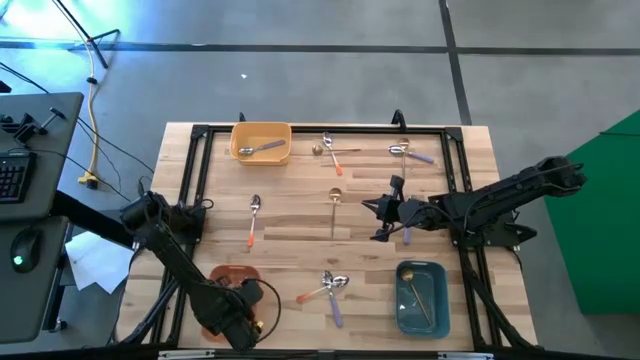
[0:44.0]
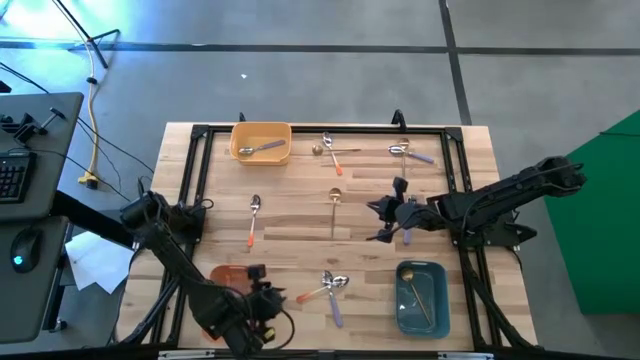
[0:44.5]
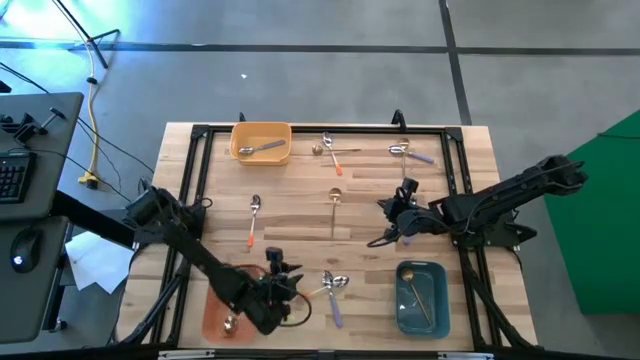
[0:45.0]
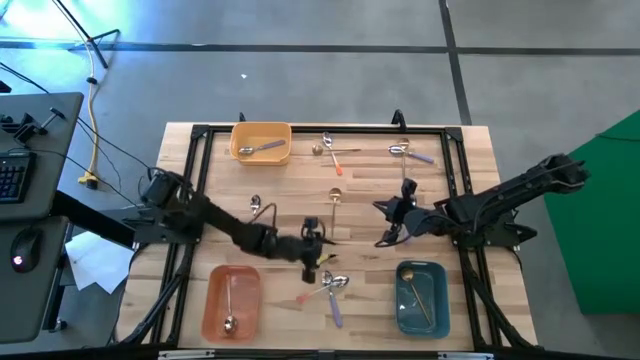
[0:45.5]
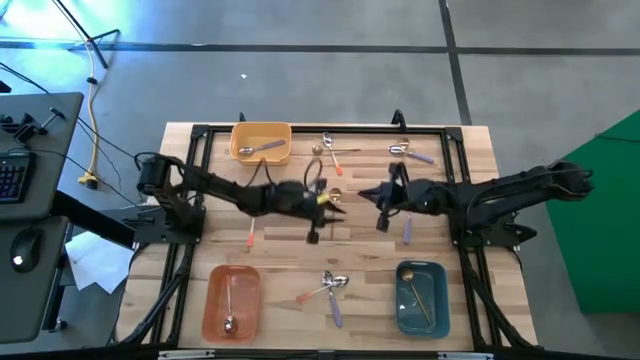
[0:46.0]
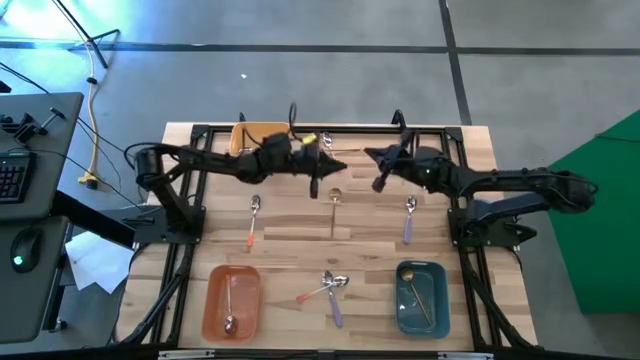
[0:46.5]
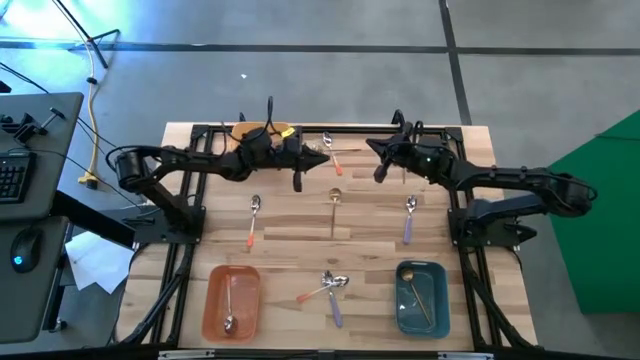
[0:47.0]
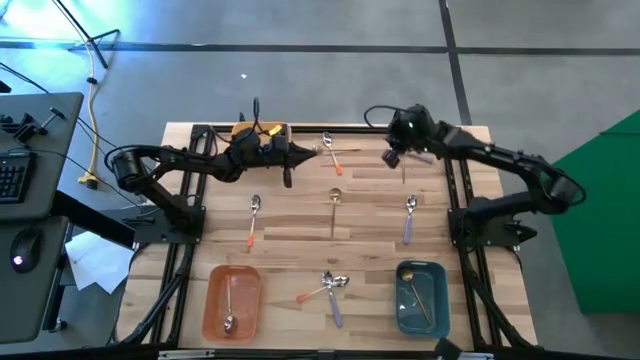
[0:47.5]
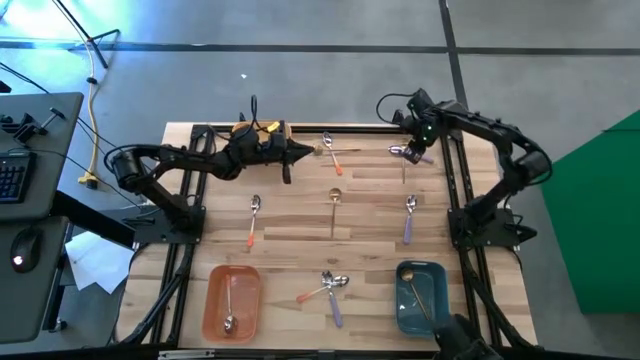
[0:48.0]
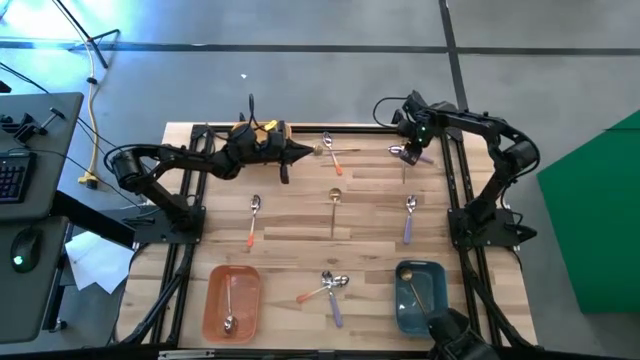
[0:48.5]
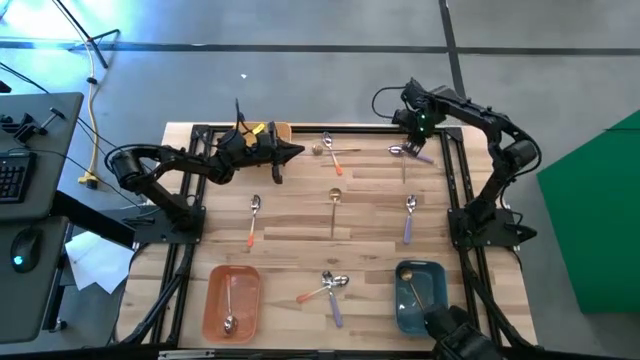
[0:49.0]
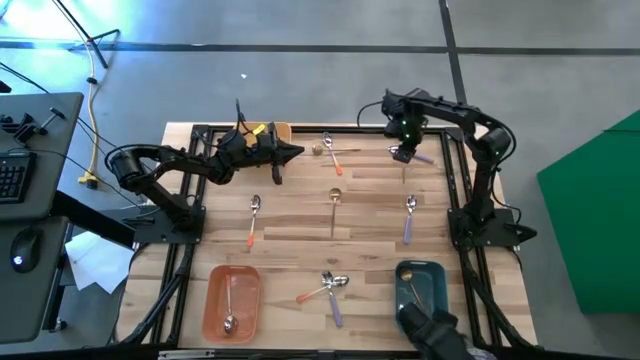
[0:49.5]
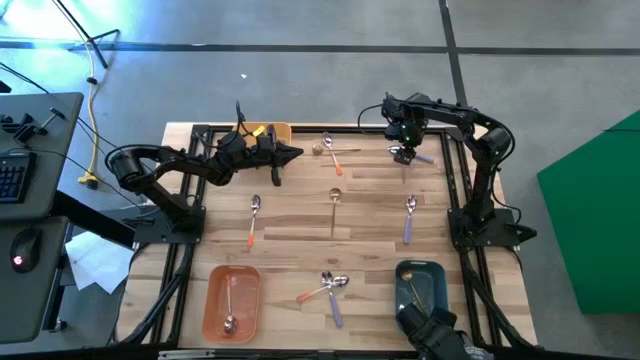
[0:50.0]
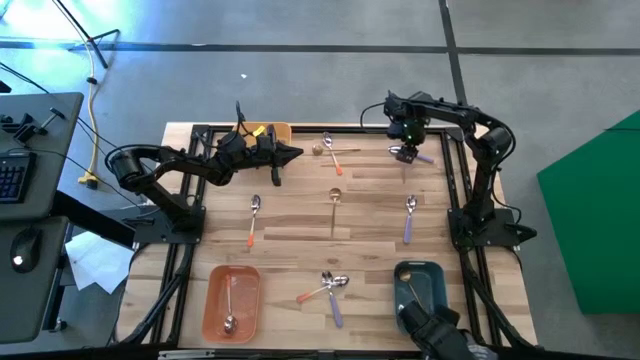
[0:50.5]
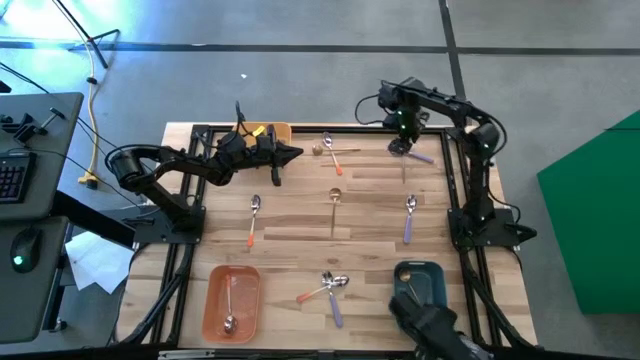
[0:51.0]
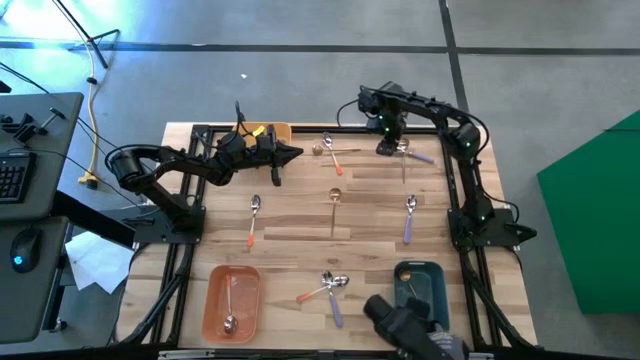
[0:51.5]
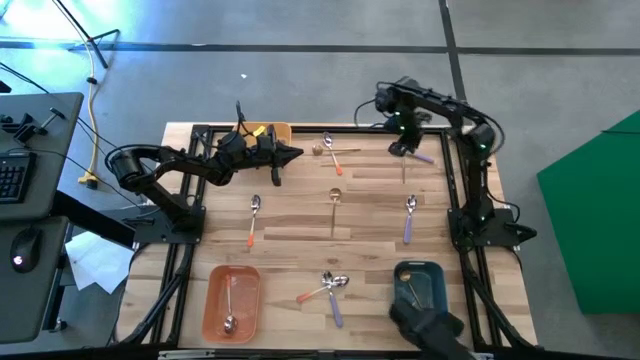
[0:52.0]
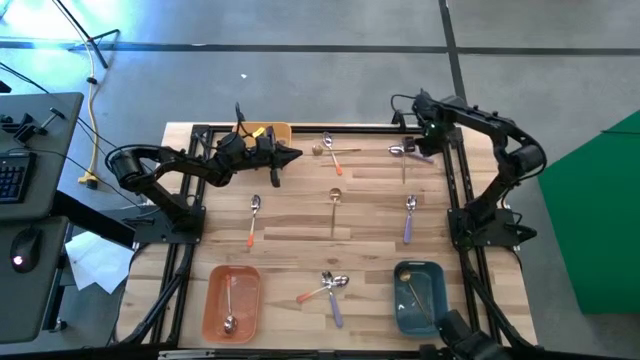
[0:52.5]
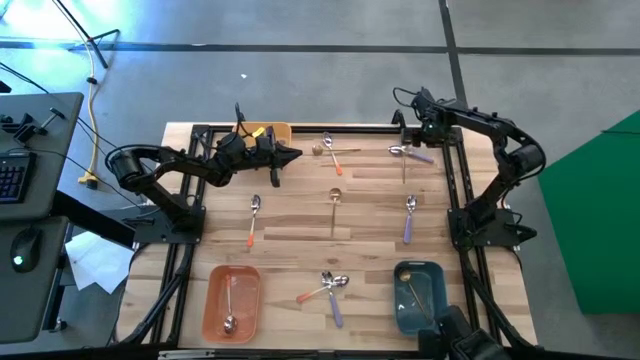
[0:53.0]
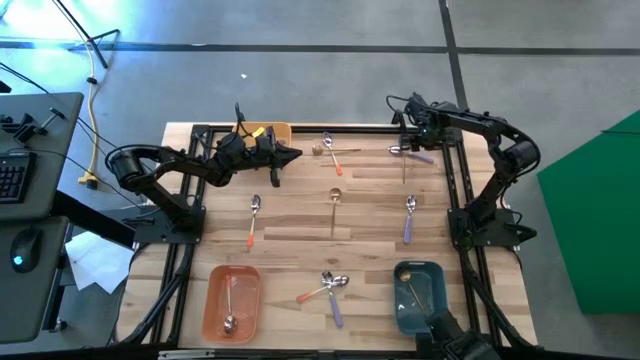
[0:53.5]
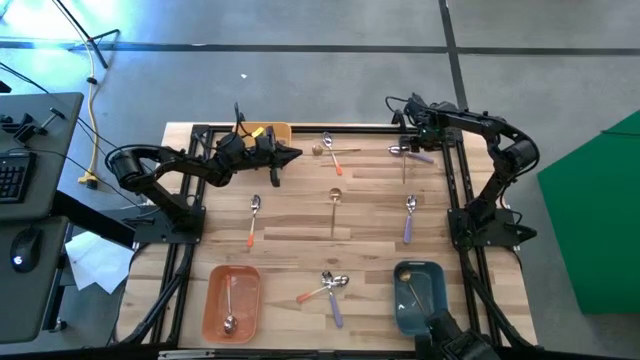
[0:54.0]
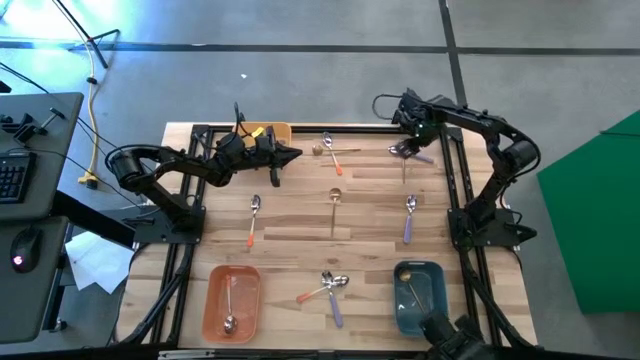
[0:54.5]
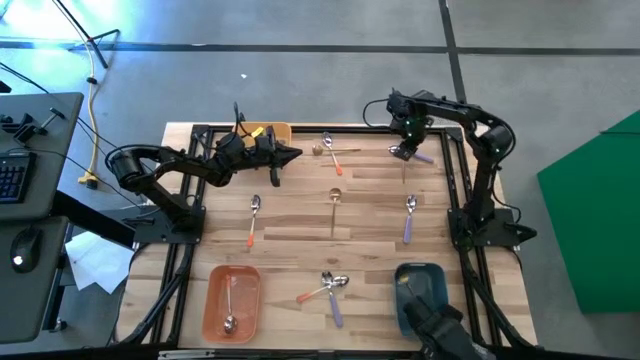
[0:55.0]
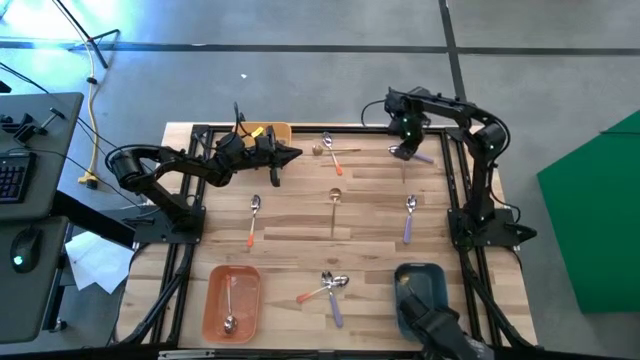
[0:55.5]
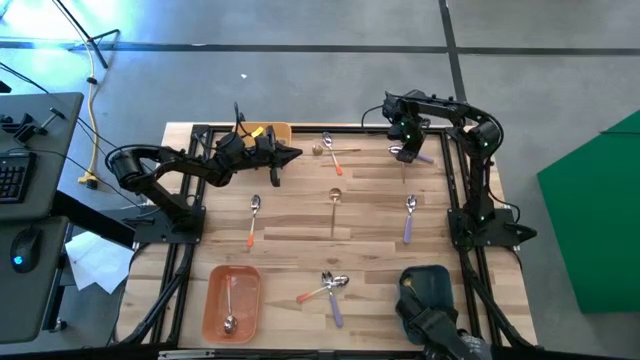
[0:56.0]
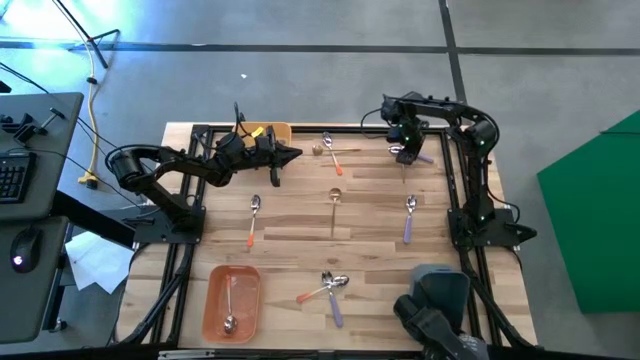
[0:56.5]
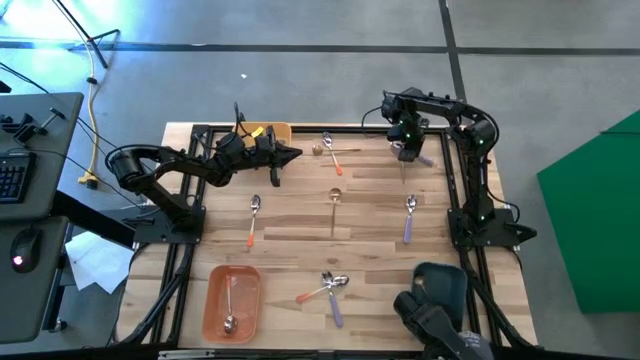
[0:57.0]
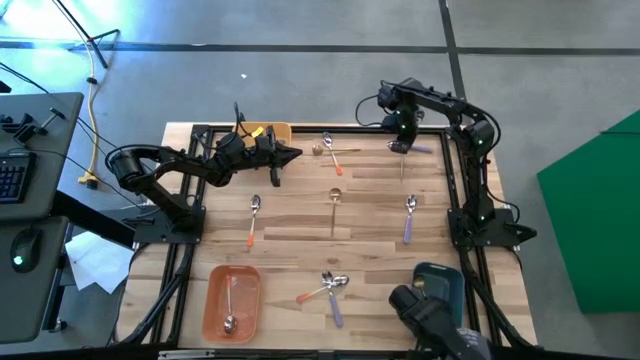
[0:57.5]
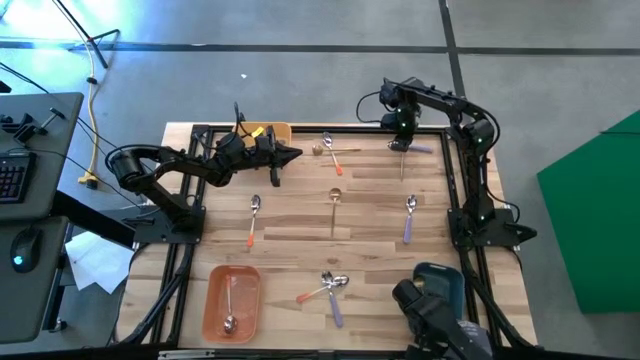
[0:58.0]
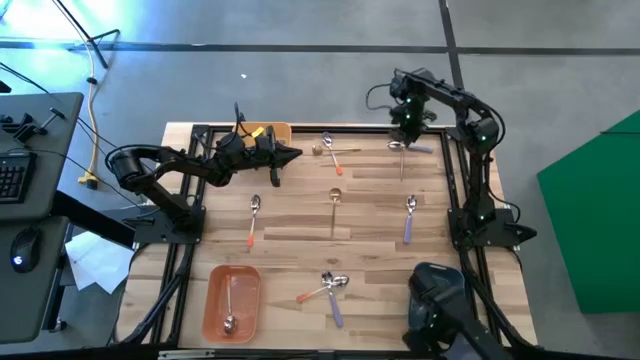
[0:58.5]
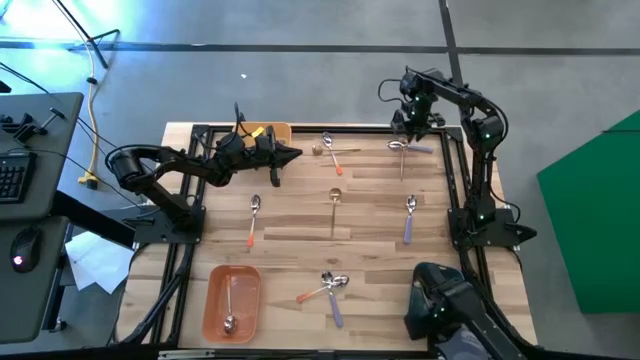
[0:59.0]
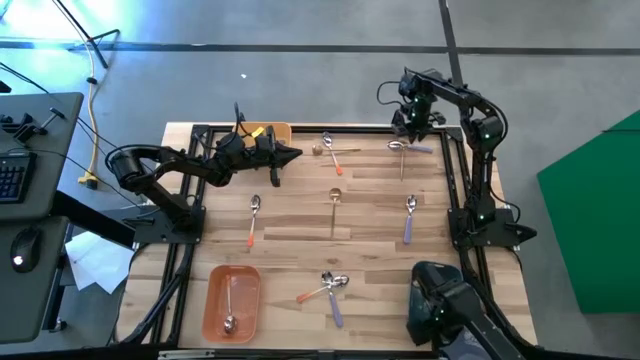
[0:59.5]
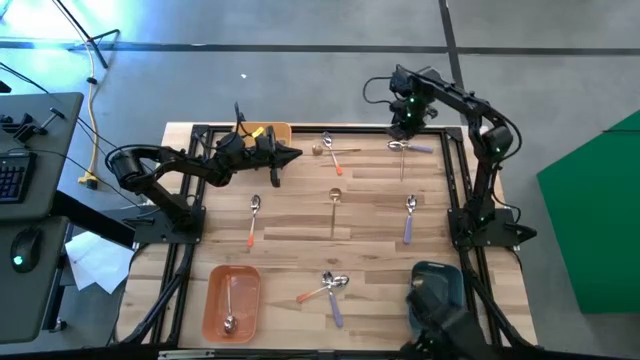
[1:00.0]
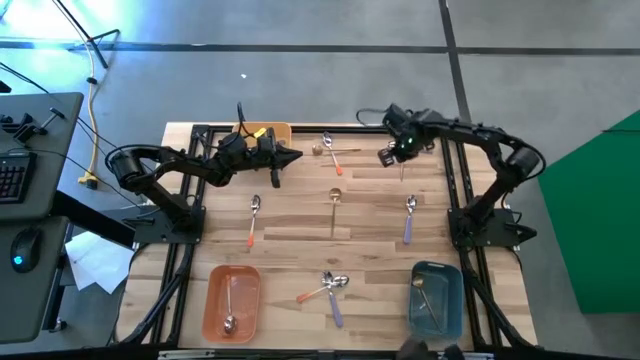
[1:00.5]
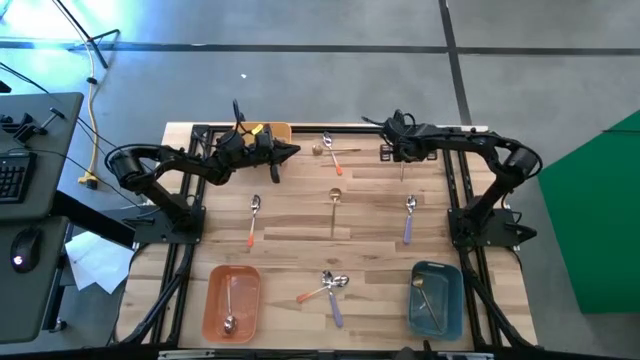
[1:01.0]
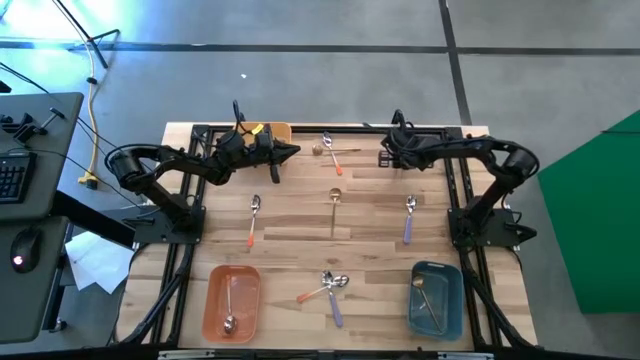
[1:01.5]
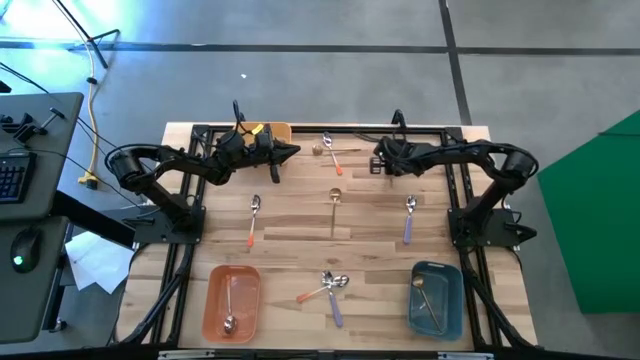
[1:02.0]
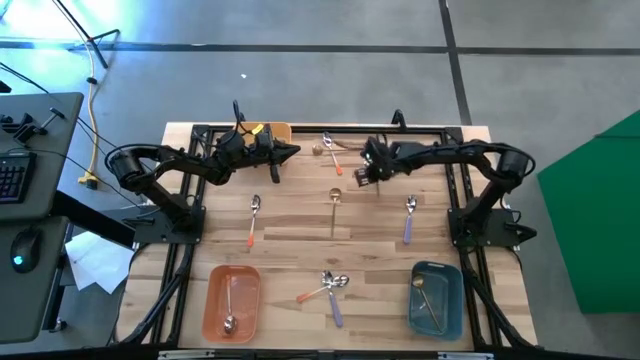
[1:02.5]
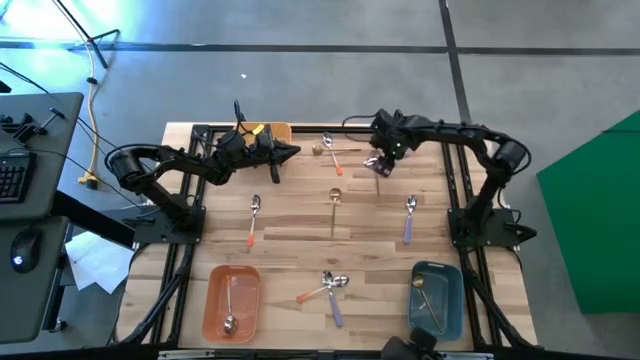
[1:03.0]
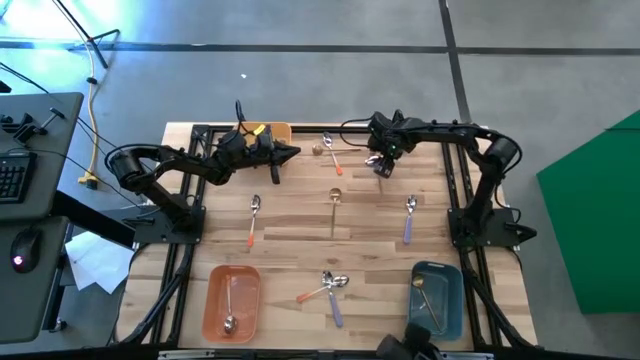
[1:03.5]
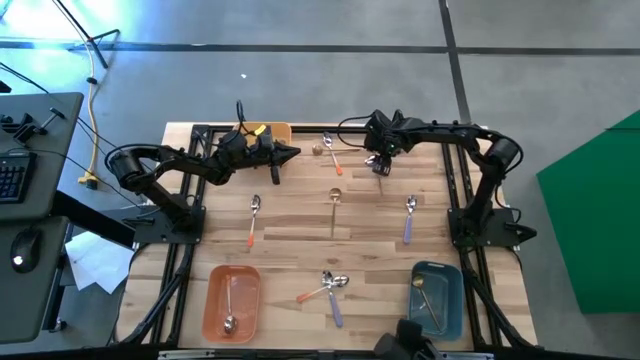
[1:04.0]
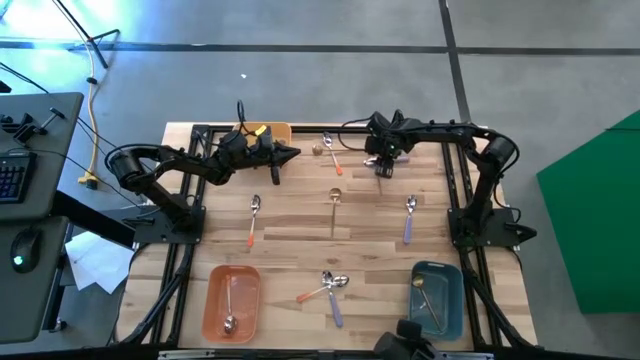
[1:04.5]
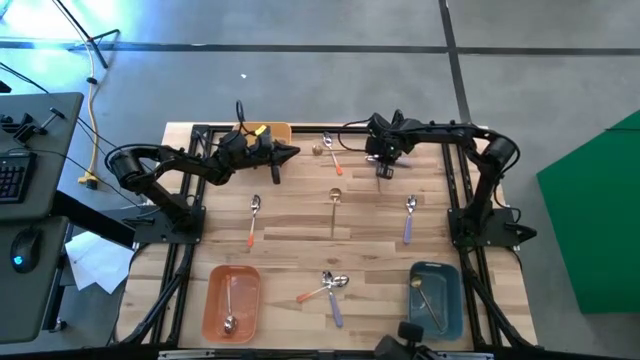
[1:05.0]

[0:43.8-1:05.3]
Task: Sort silverware by color (type)
Put the purple spoon into the yellow bin
